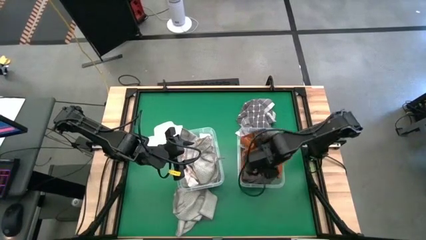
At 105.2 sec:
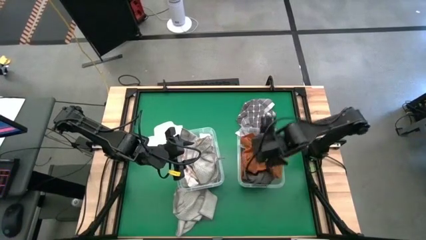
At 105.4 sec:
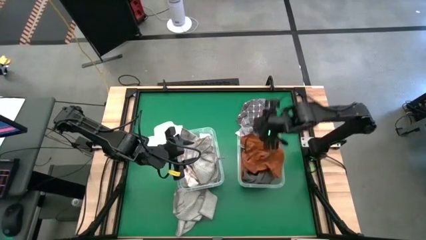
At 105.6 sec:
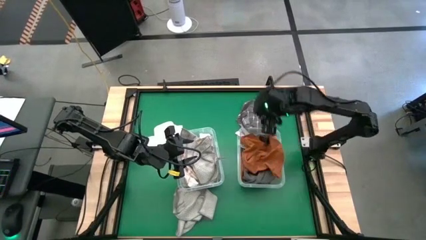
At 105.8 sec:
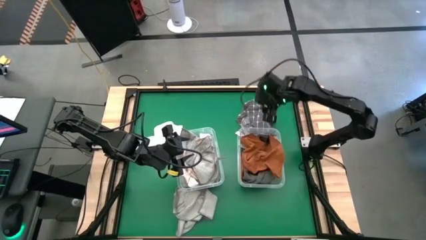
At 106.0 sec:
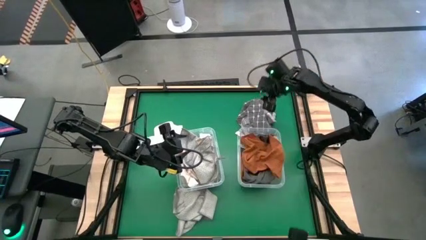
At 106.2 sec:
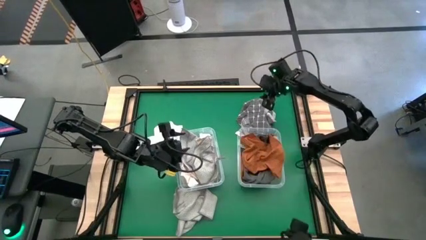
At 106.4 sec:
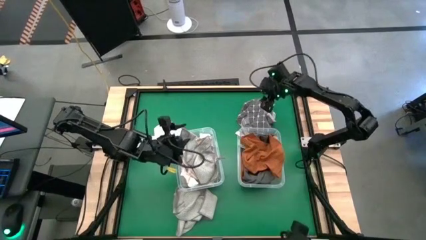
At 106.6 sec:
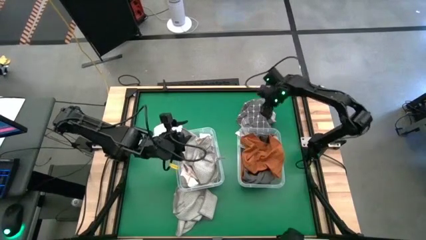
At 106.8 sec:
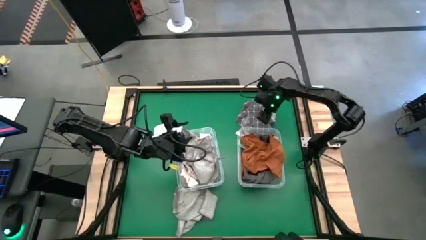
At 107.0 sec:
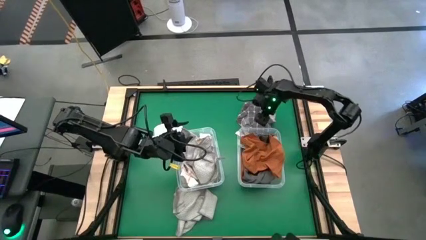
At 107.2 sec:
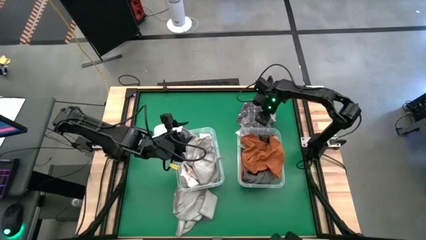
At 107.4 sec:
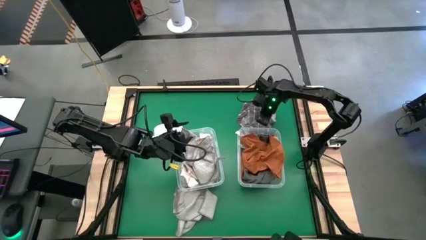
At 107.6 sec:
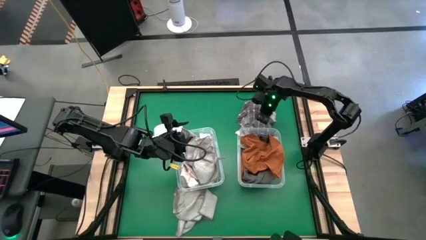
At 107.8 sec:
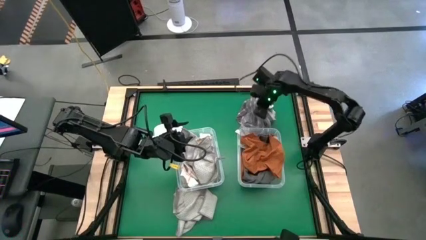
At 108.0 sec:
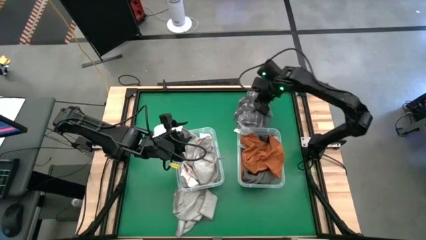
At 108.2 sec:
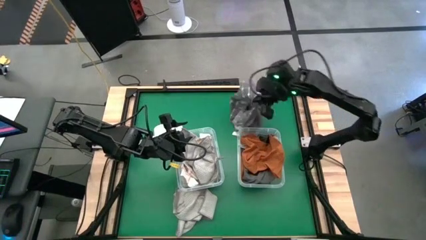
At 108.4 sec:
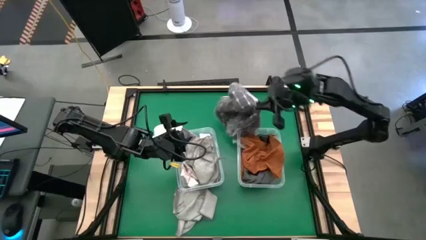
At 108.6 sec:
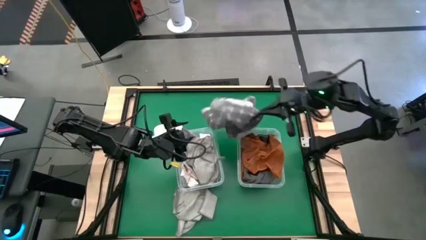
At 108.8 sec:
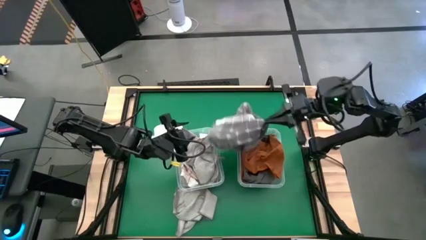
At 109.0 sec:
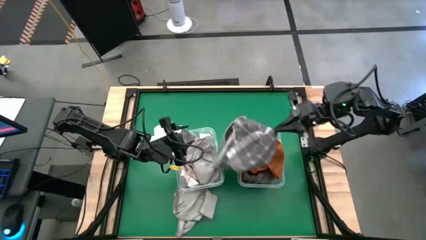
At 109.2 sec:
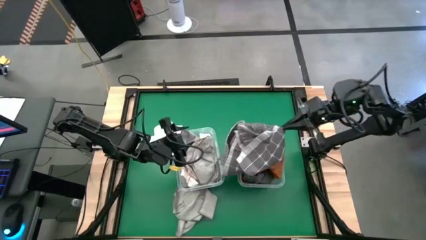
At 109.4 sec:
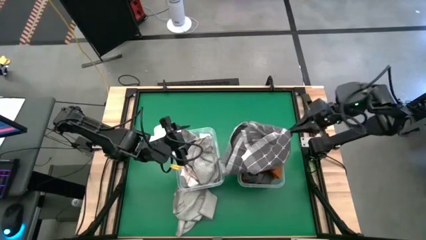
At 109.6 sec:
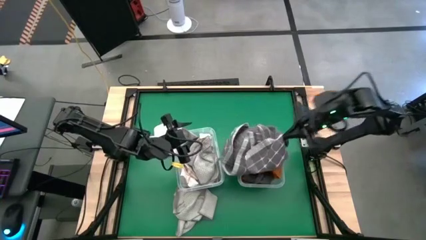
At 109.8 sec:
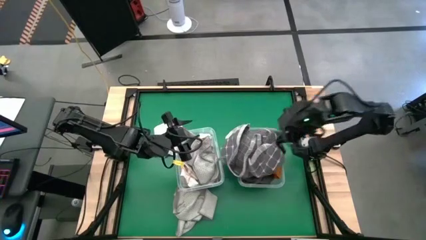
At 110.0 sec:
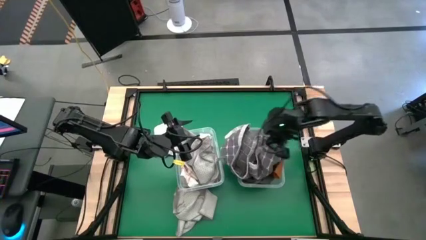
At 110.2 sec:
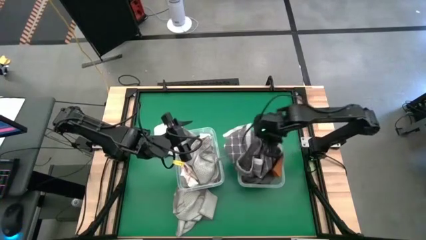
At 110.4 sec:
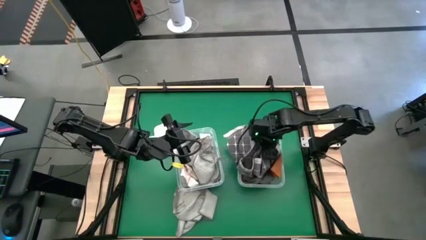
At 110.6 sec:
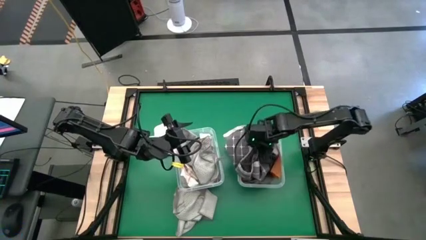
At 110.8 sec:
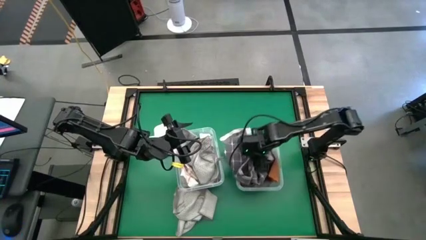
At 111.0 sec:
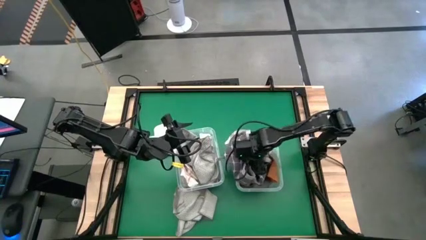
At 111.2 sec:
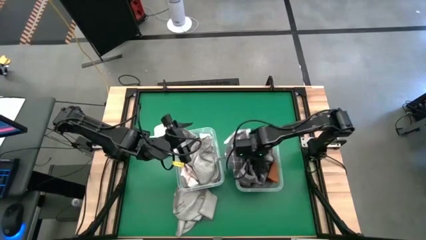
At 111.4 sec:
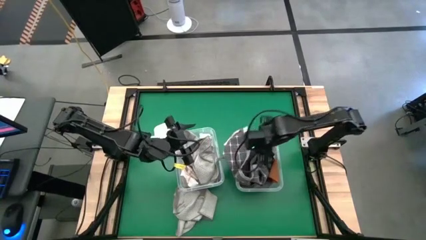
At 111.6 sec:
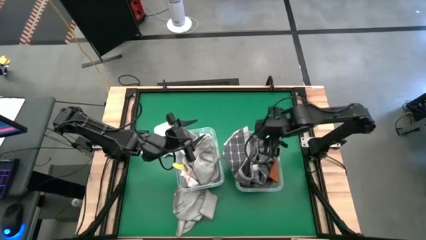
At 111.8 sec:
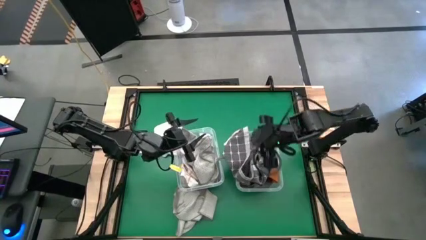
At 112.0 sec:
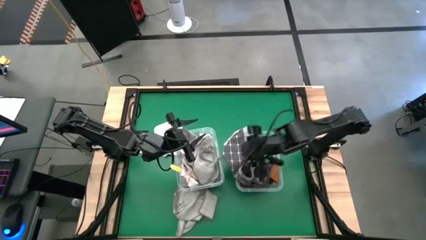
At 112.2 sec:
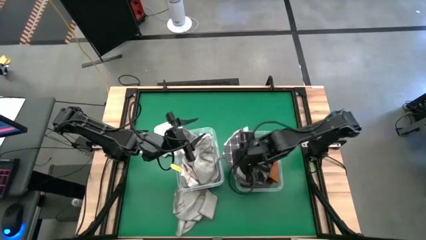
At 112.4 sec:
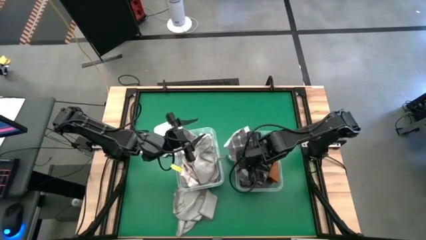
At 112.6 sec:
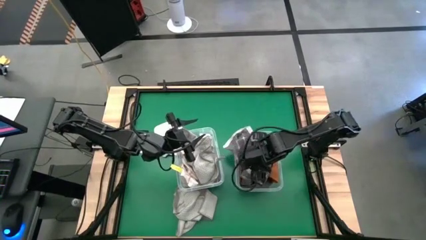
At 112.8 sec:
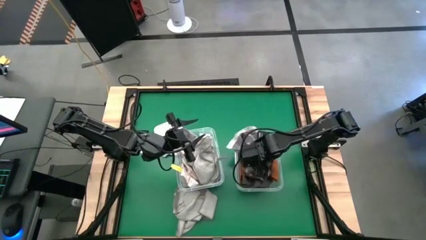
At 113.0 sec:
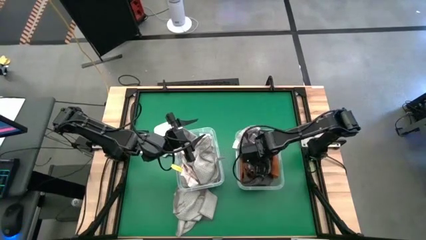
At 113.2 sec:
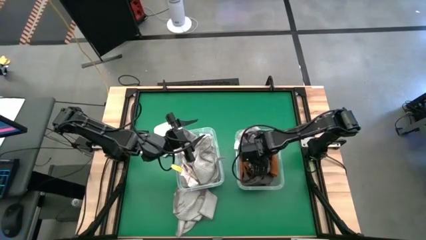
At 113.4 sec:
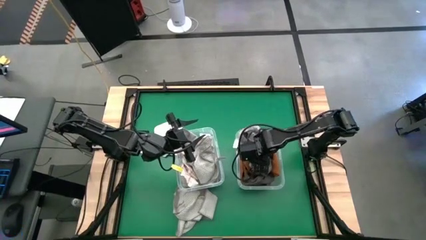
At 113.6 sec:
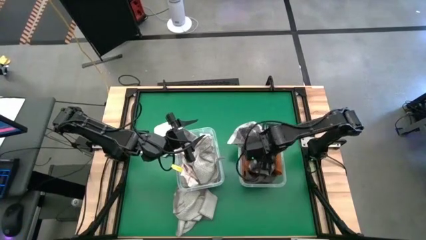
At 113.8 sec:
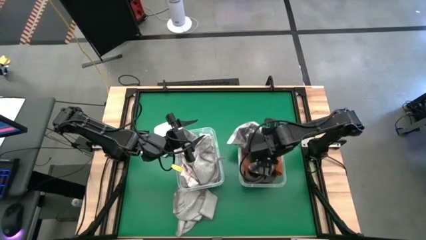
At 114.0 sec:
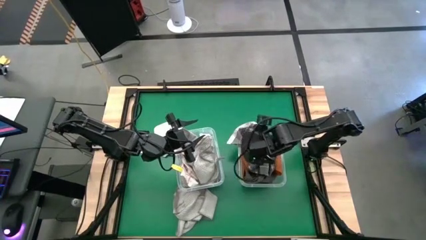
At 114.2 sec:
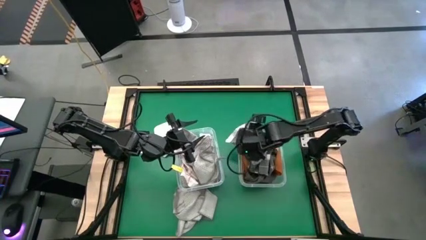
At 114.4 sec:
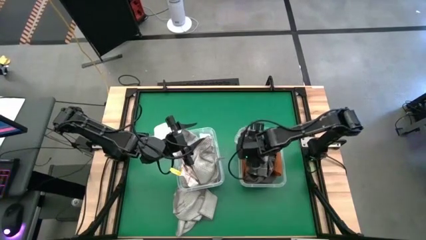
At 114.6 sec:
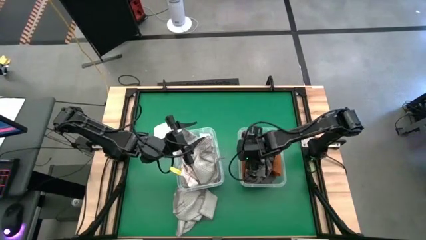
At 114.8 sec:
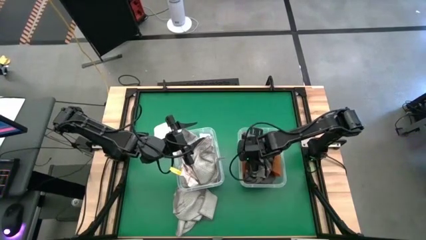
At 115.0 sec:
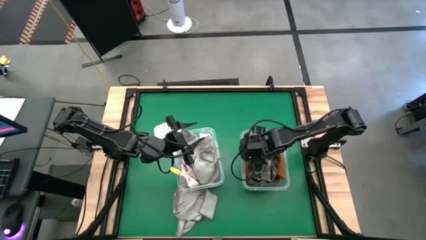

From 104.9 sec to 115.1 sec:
Task: Sort microfiber towel by color & place in baskets
Put the grey patterned microfiber towel into the right transparent bin
